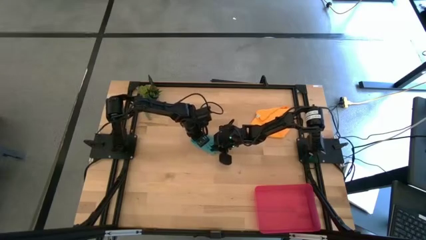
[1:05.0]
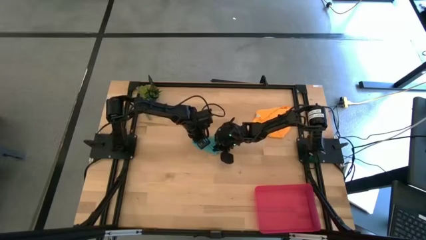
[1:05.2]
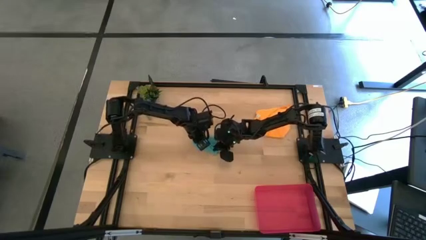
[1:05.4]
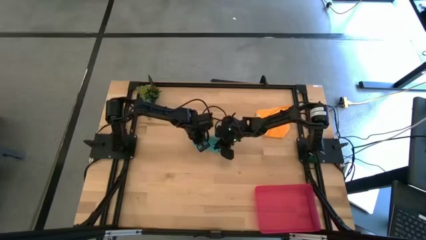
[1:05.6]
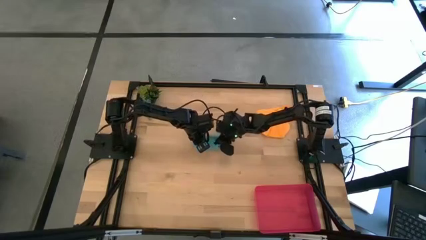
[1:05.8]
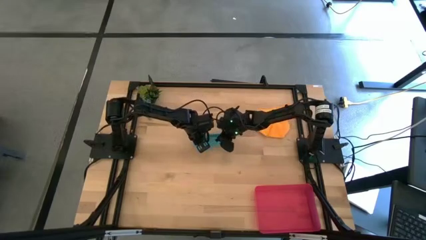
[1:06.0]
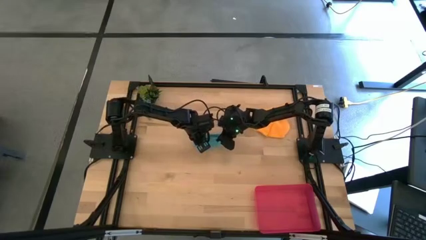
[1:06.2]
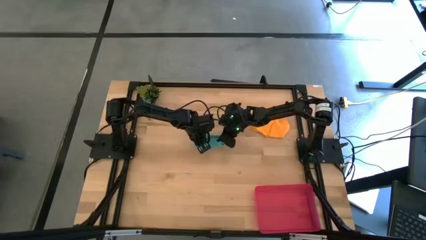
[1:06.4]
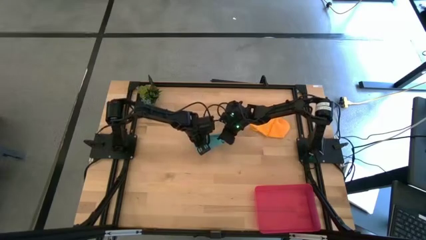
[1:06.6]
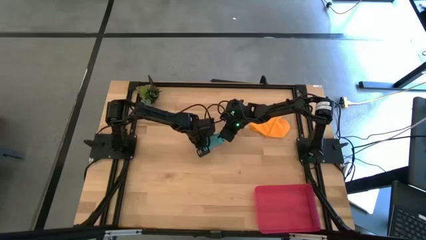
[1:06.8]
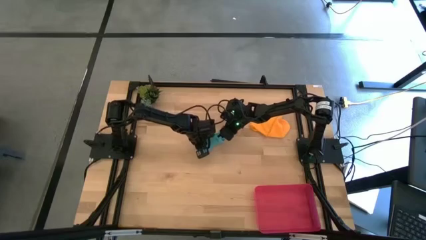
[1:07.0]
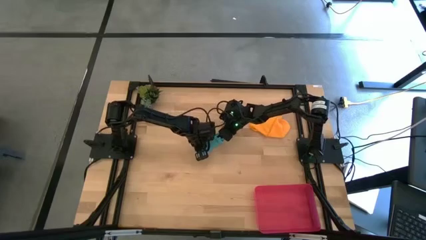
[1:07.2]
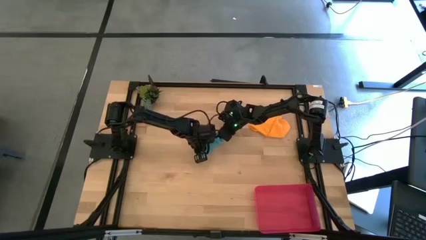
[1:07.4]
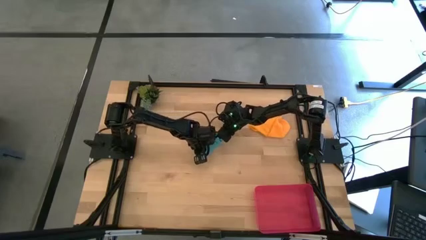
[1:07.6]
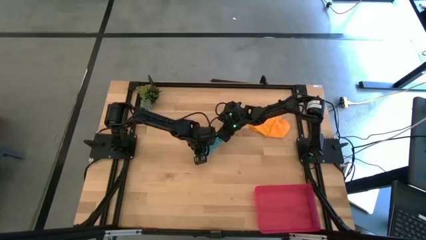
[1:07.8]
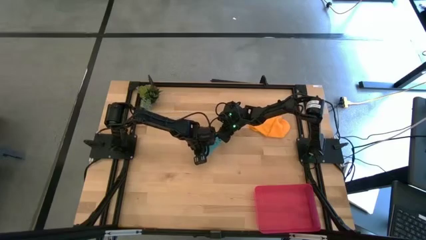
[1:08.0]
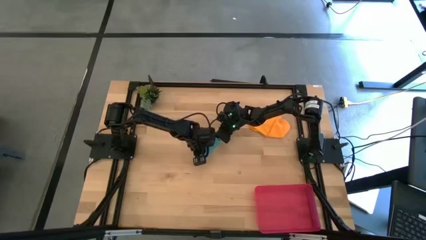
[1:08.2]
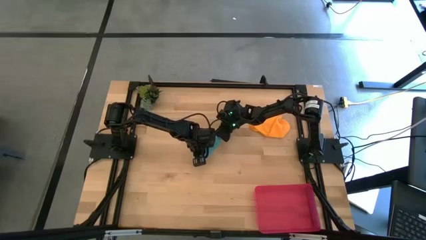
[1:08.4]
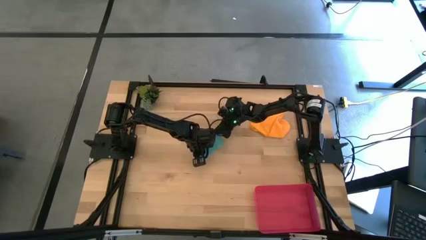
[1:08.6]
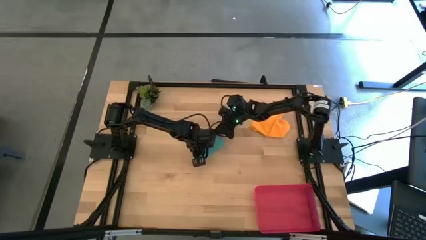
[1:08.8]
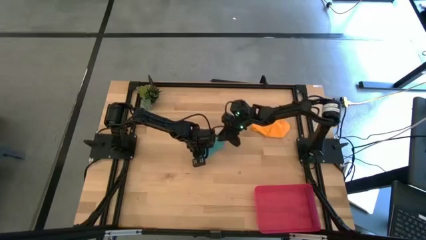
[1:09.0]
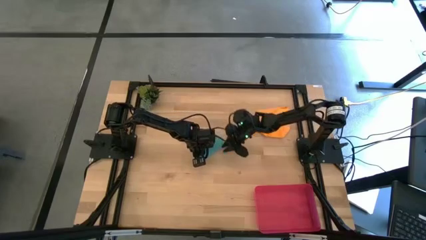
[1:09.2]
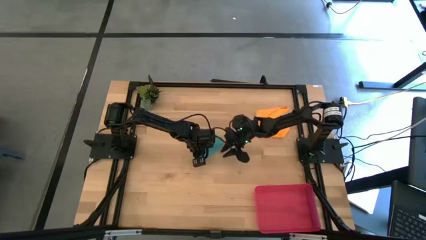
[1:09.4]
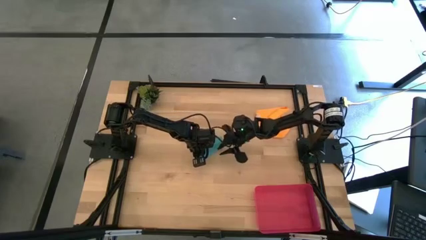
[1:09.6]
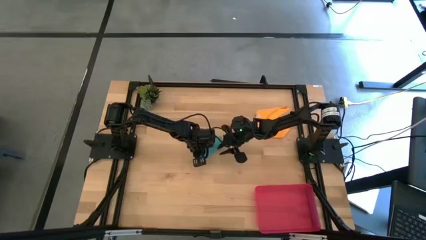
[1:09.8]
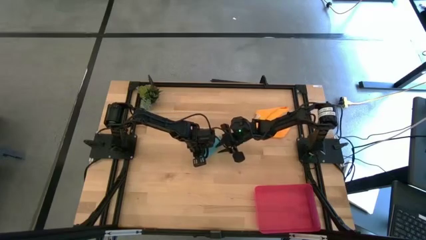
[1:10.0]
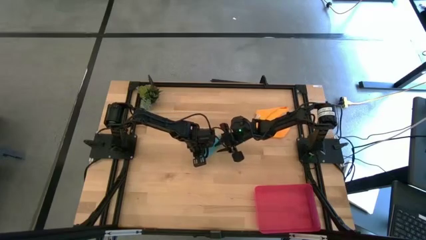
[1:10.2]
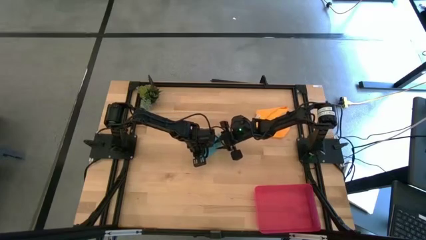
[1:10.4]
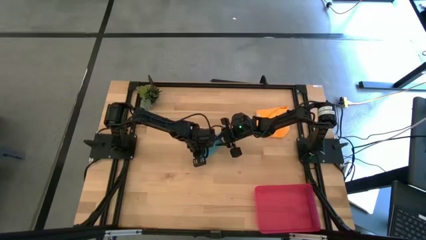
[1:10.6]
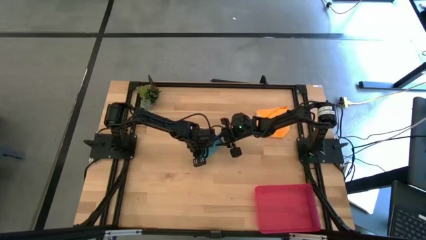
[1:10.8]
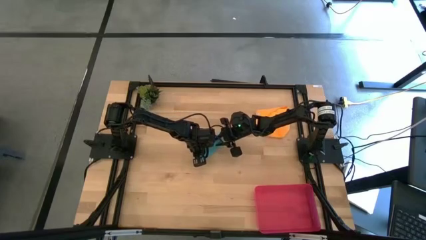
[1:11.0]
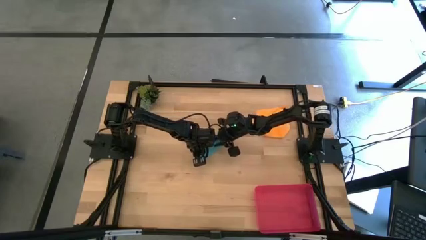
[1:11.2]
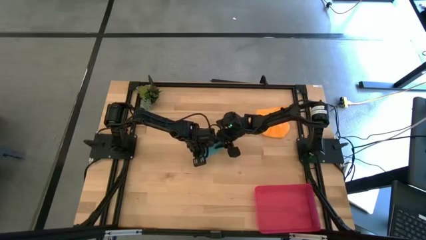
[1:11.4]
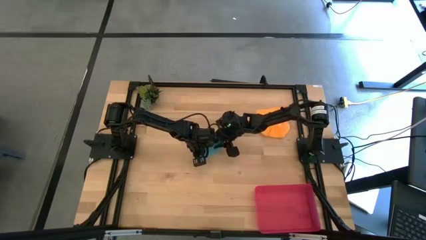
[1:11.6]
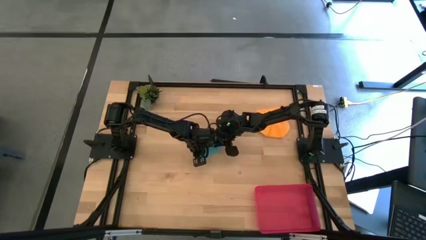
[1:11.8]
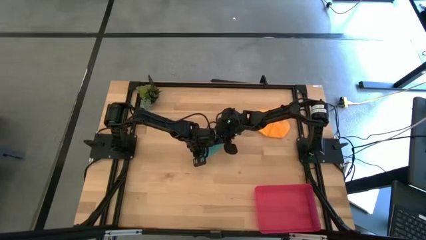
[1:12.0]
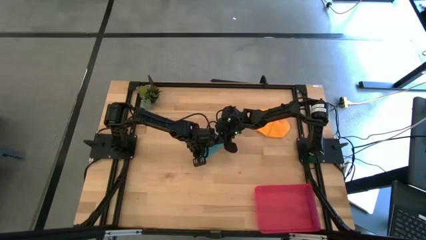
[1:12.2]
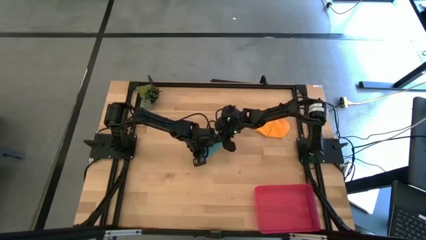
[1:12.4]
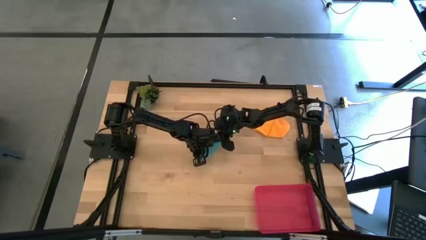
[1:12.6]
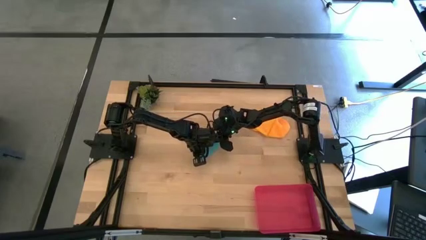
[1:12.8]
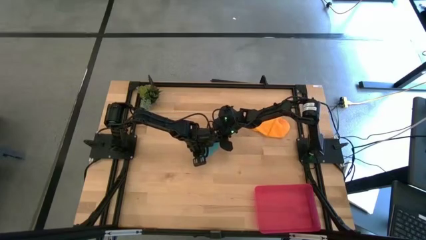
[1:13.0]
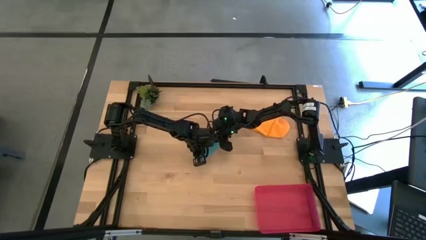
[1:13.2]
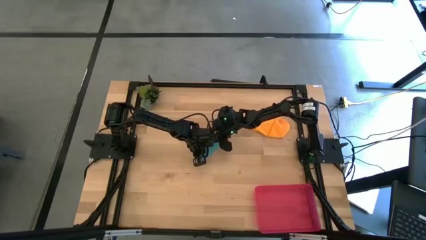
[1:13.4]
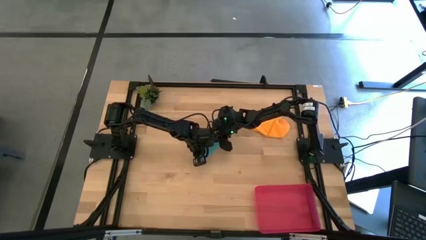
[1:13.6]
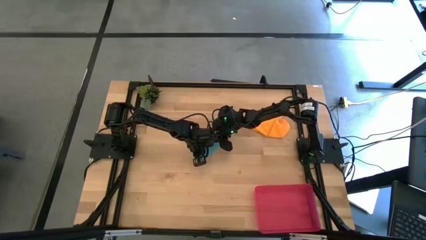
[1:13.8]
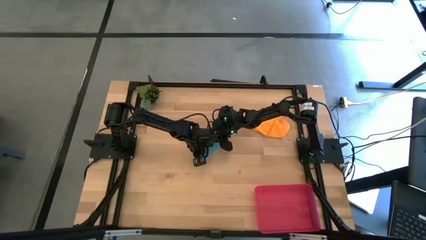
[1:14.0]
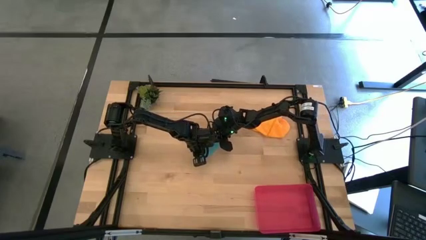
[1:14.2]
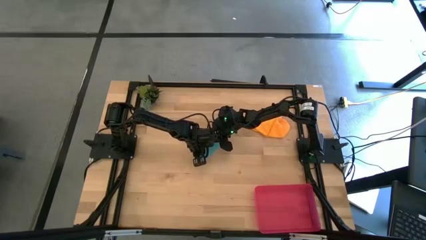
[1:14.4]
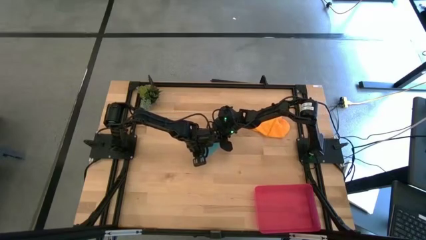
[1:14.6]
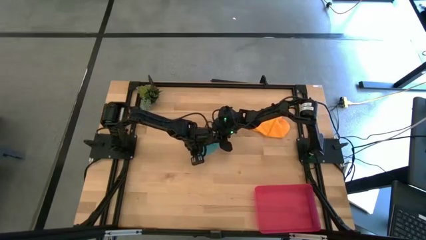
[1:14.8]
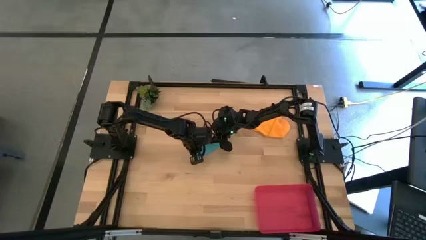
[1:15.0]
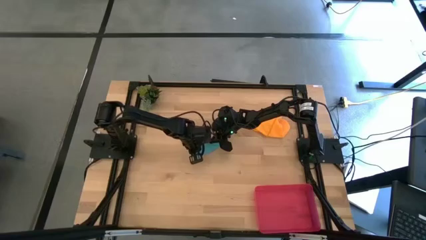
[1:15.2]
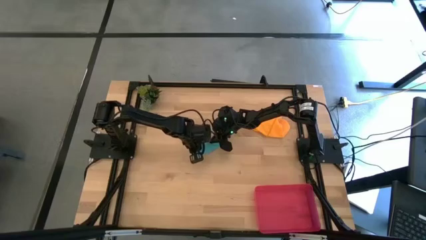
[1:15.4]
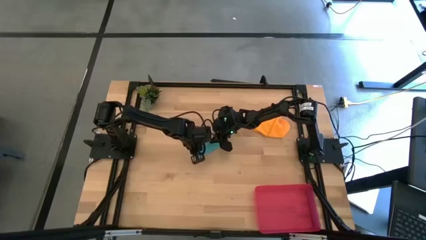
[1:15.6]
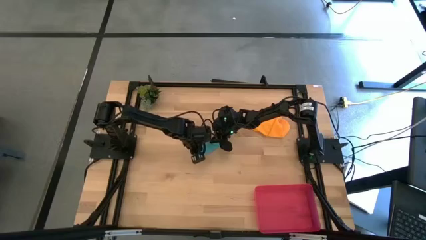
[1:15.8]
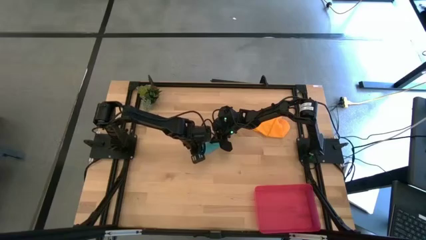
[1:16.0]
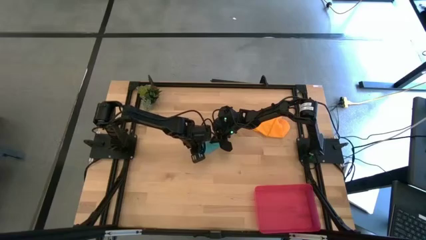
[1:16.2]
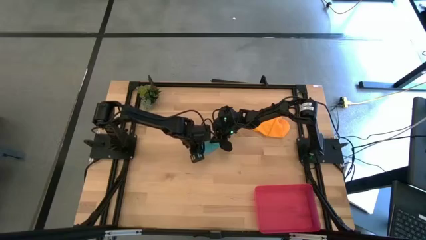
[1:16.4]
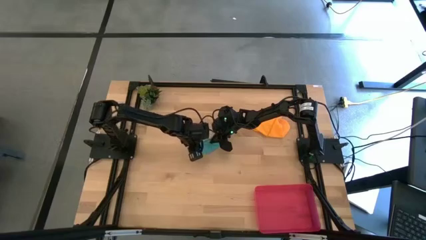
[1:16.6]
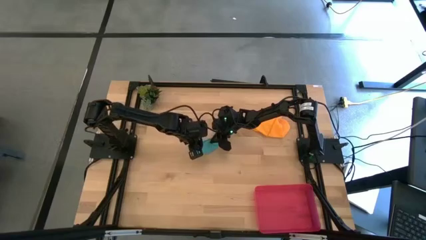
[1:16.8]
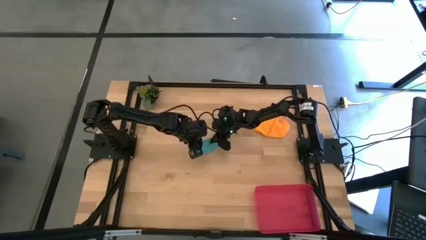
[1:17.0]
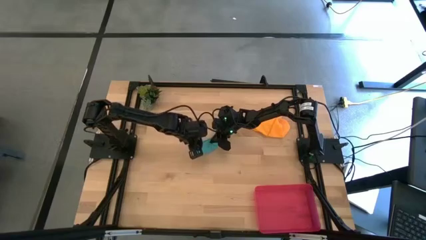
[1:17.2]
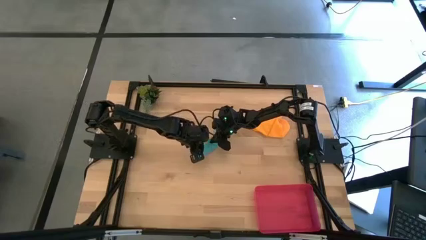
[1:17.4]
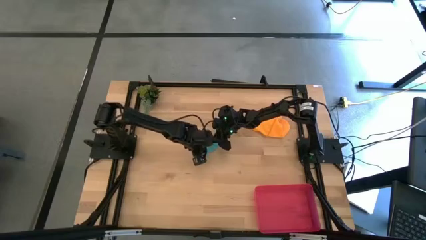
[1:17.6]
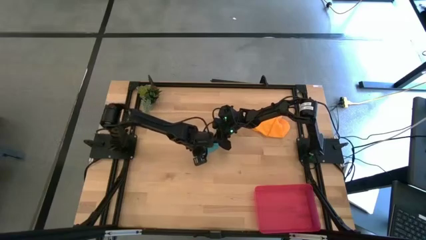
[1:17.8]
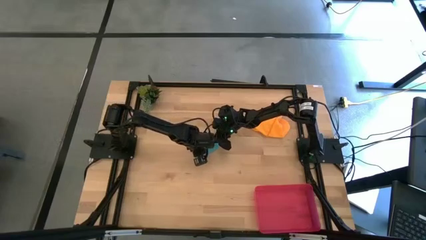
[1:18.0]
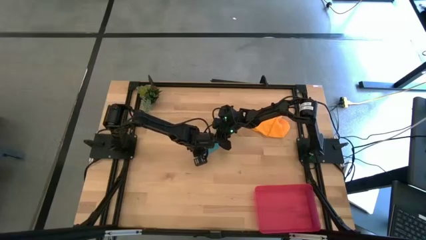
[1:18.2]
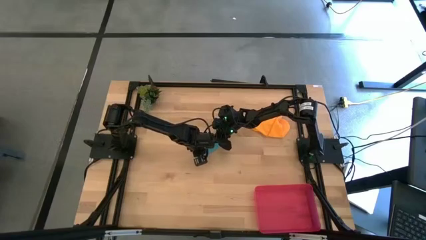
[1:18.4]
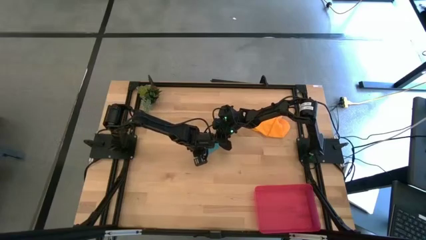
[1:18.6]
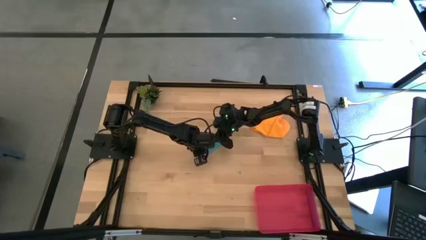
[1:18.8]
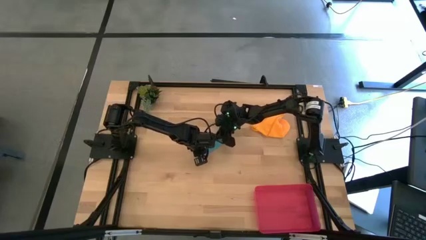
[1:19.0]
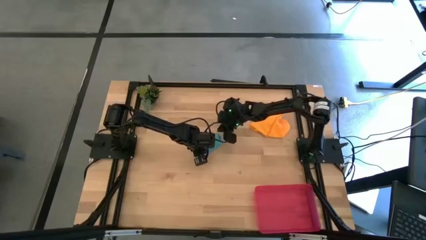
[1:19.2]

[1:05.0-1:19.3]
Task: Roll microfiber towels into tight, uniform cylinder then place into a basket
Roll the blue microfiber cloth
